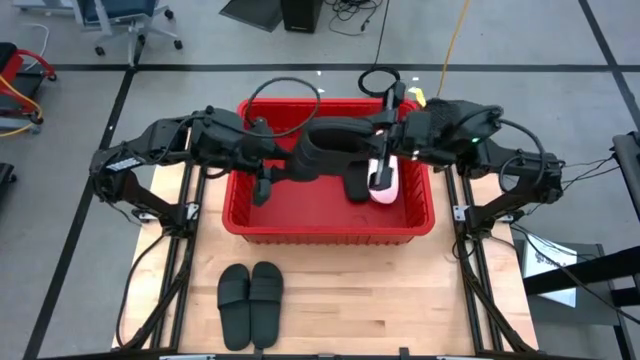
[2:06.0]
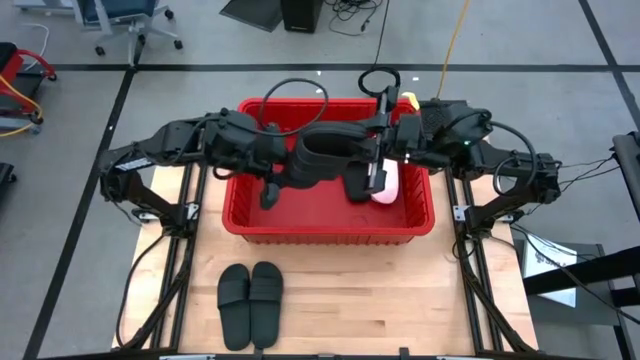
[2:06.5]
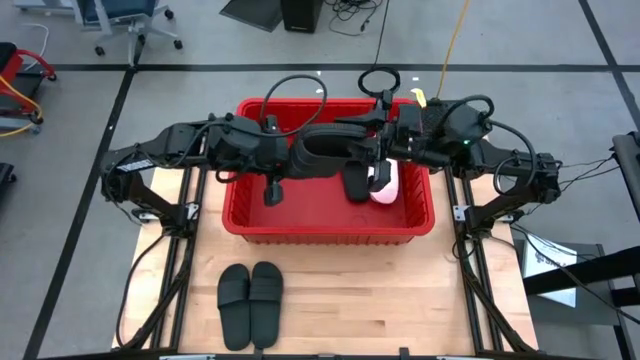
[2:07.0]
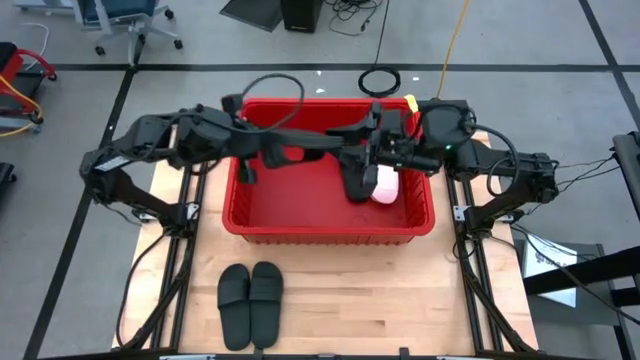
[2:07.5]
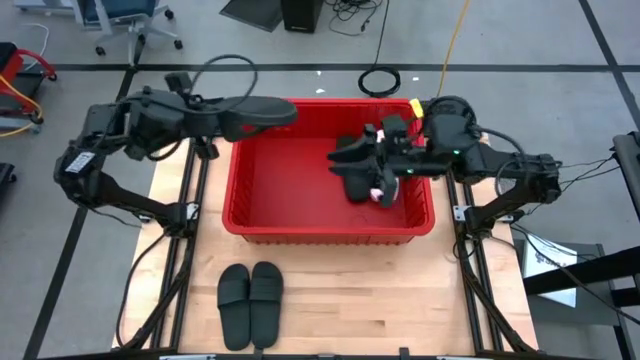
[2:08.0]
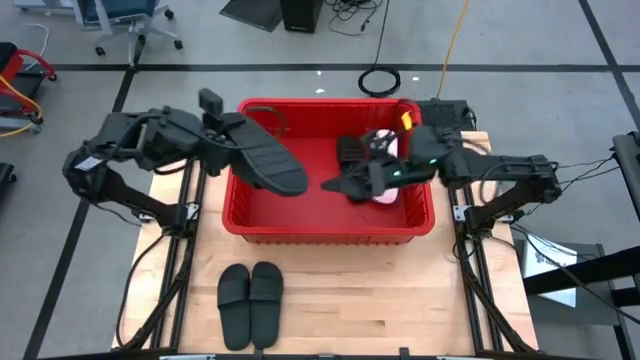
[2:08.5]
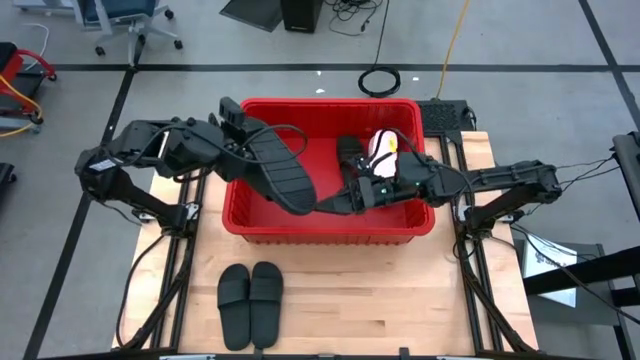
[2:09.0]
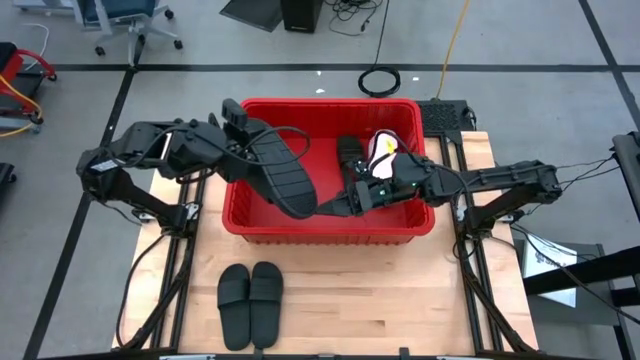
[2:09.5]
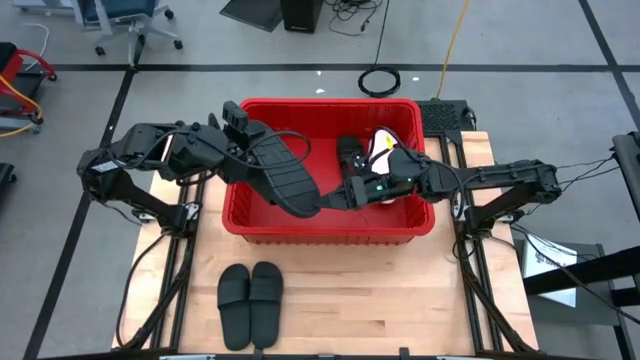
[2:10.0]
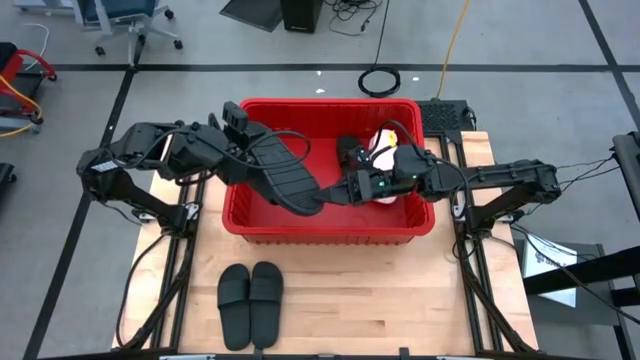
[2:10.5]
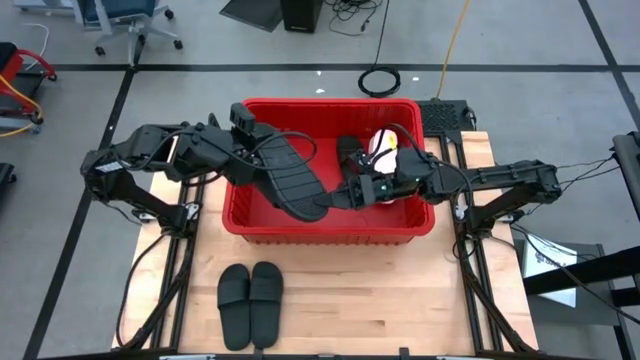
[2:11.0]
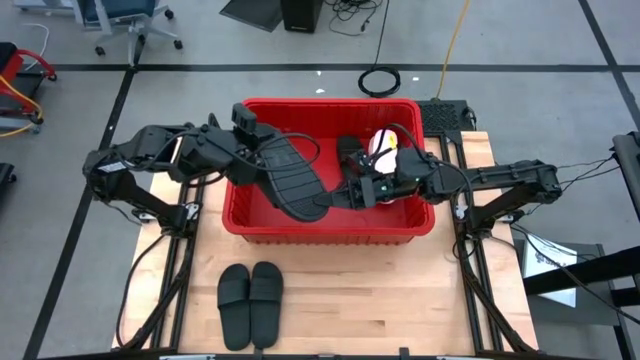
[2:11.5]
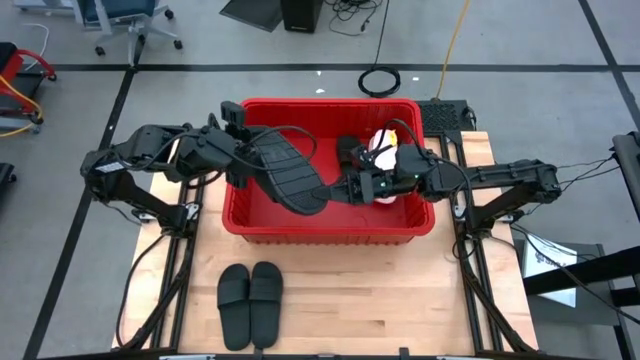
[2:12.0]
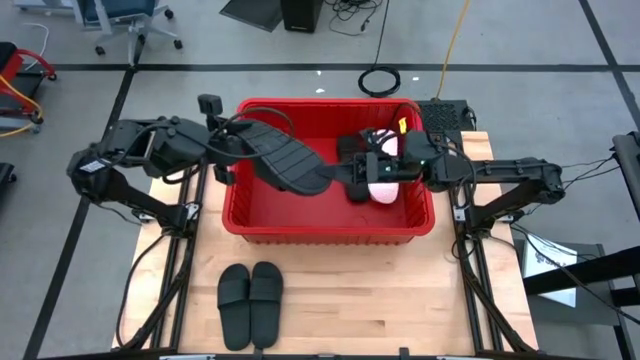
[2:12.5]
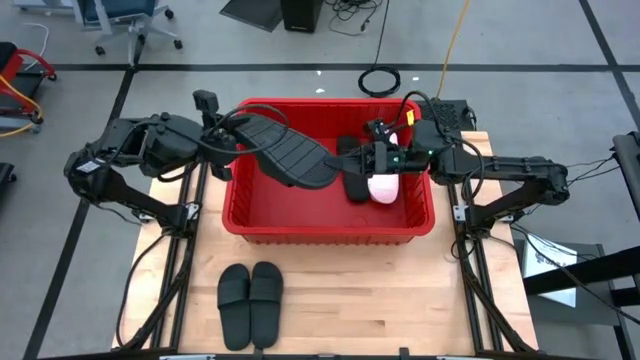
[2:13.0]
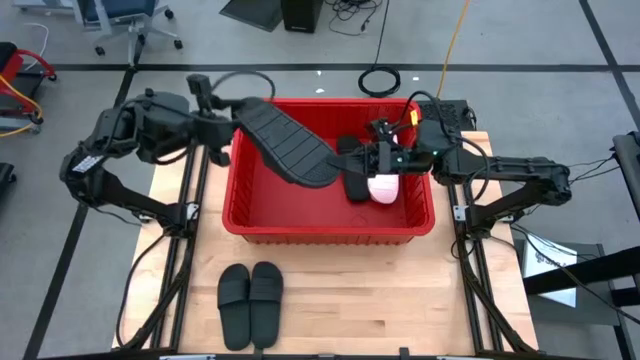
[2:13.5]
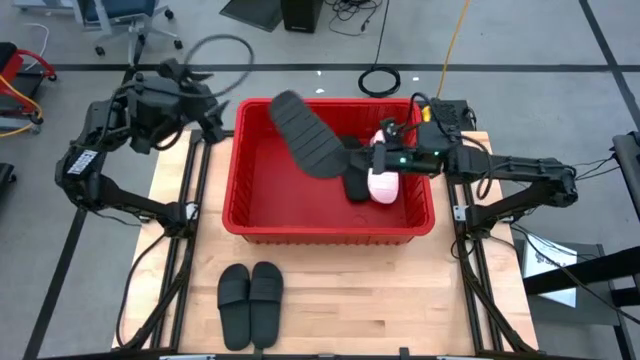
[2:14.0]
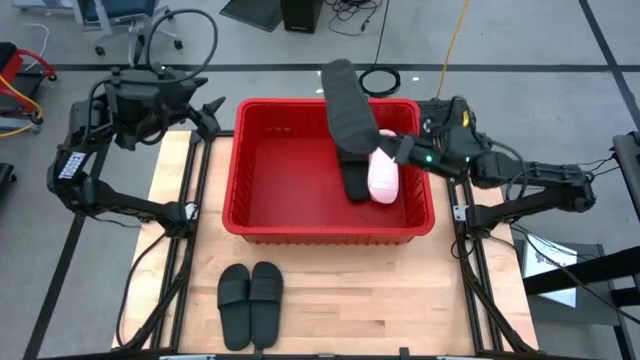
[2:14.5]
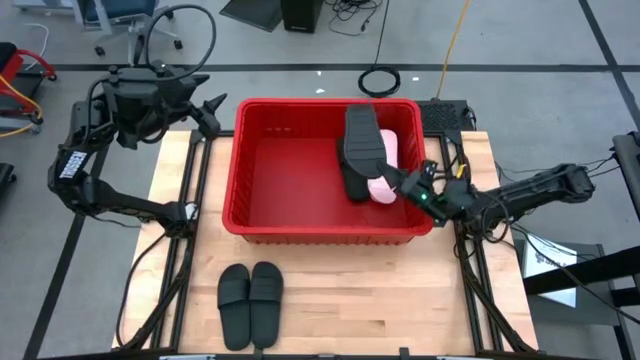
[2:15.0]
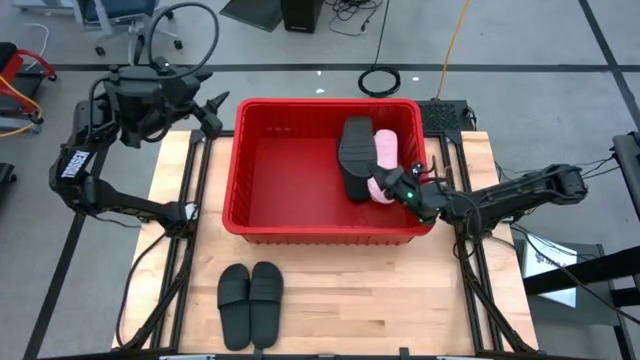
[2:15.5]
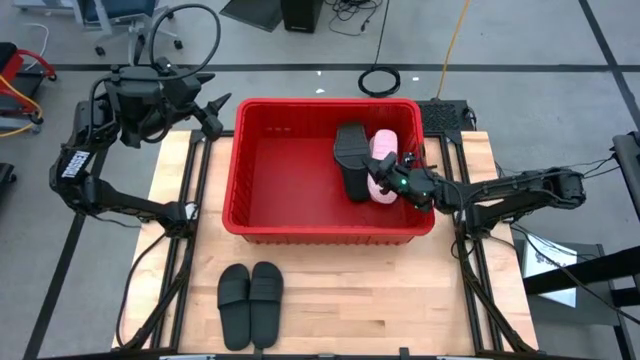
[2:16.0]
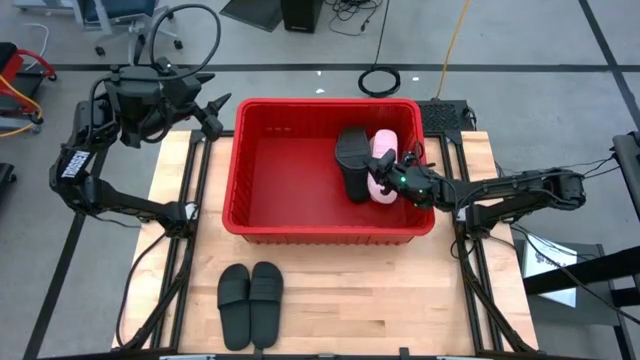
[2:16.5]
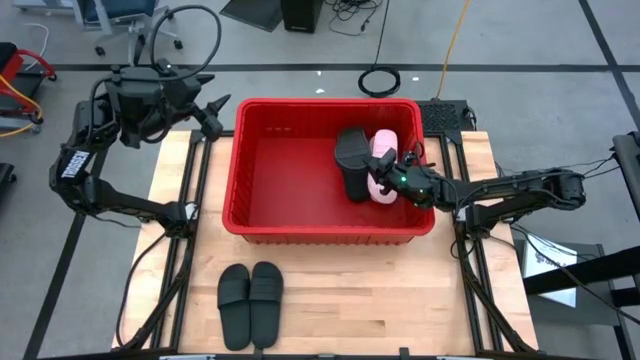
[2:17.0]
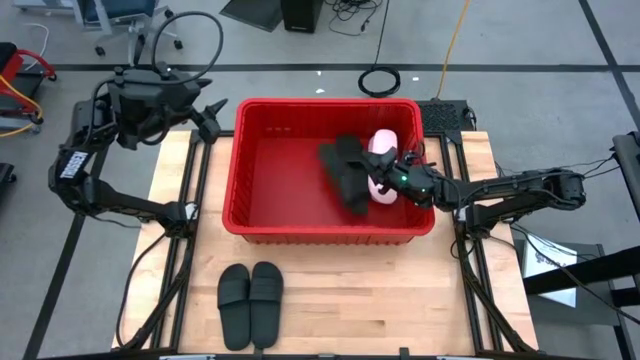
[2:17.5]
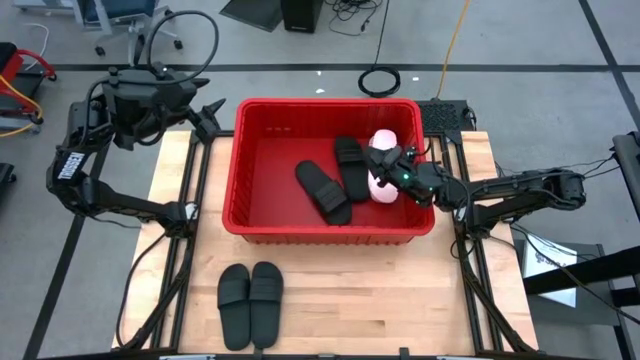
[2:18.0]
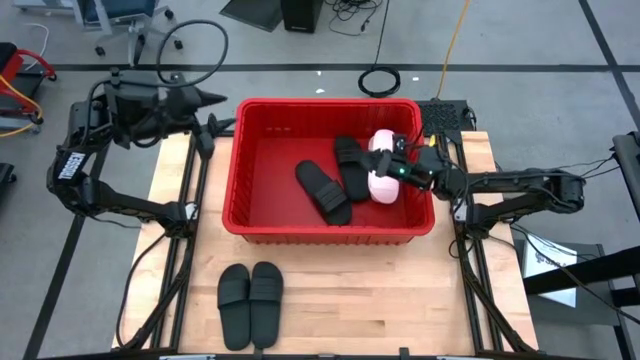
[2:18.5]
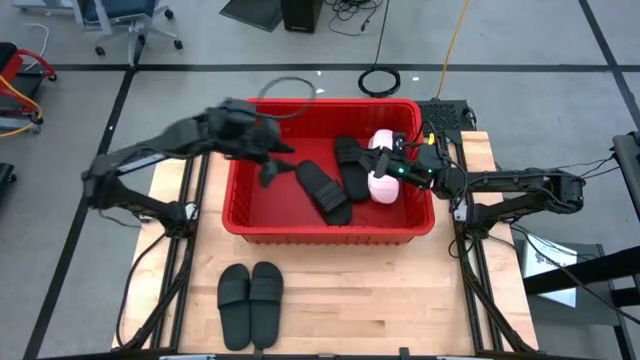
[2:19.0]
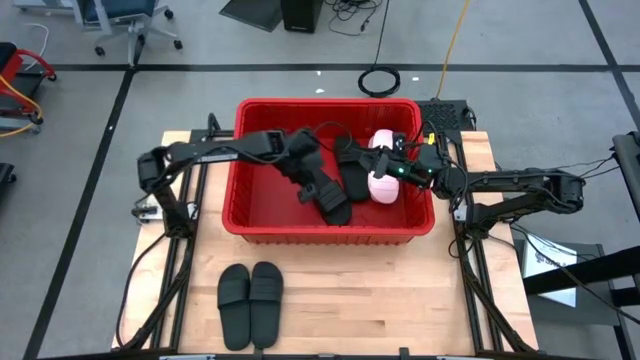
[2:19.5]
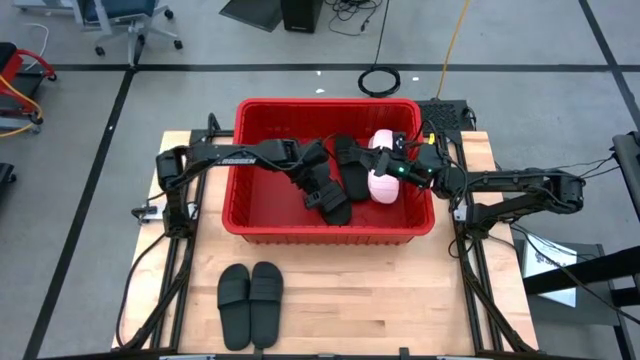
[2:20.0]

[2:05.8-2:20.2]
Task: Pick and place slides into bin
Stack the black slide on top of the black slide in the red bin

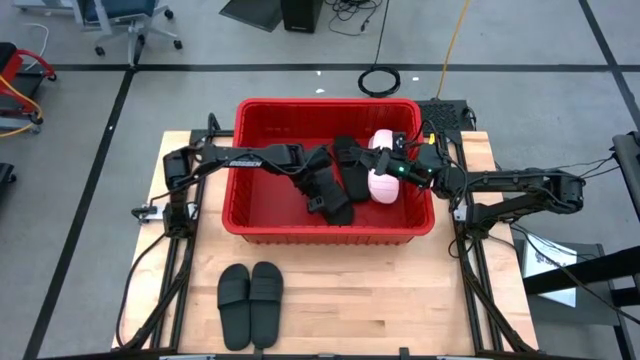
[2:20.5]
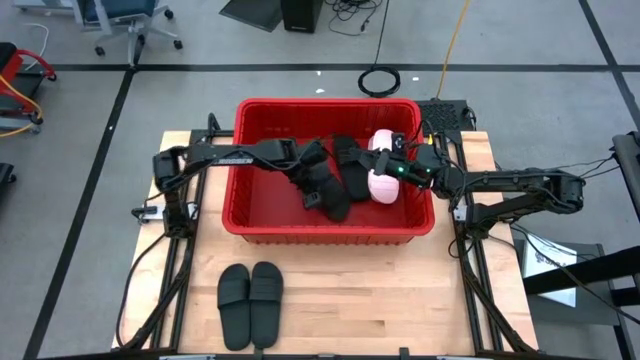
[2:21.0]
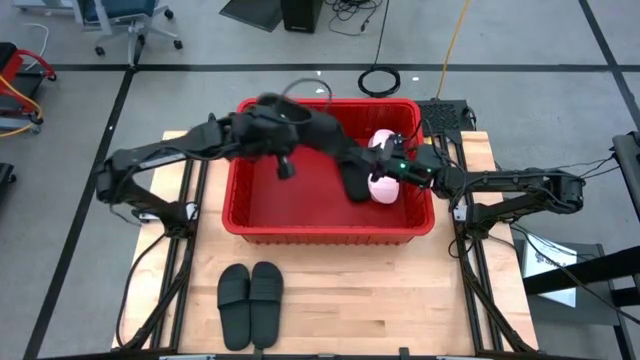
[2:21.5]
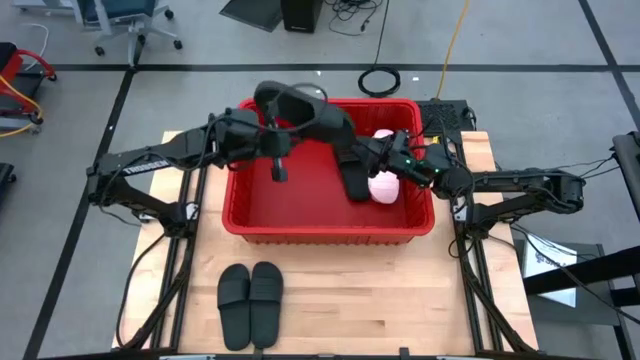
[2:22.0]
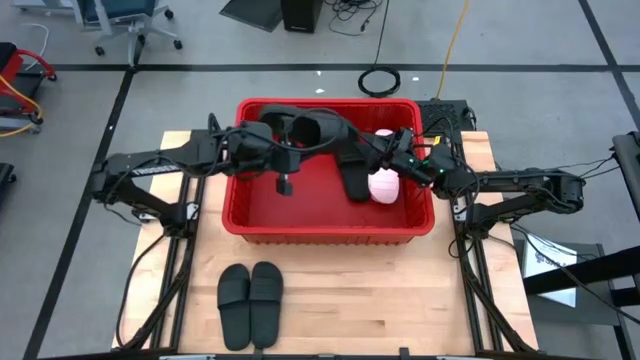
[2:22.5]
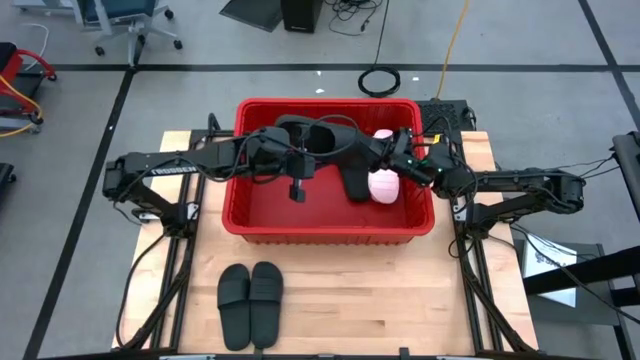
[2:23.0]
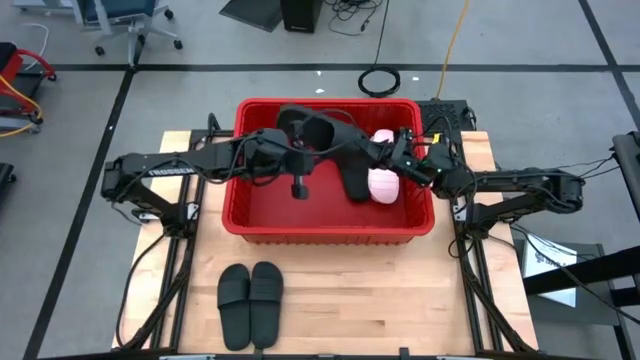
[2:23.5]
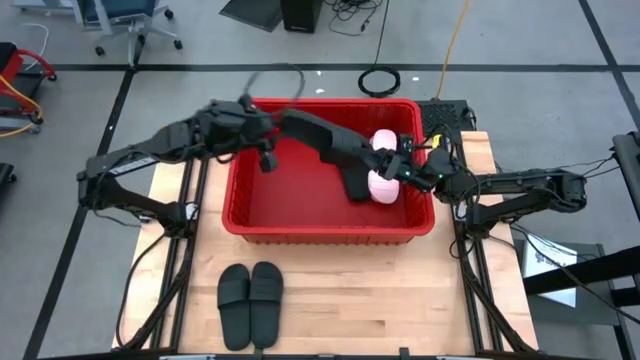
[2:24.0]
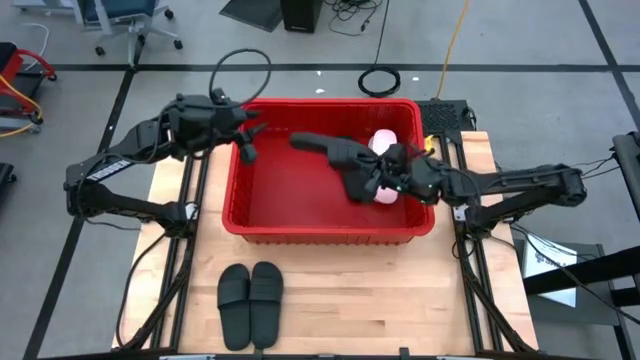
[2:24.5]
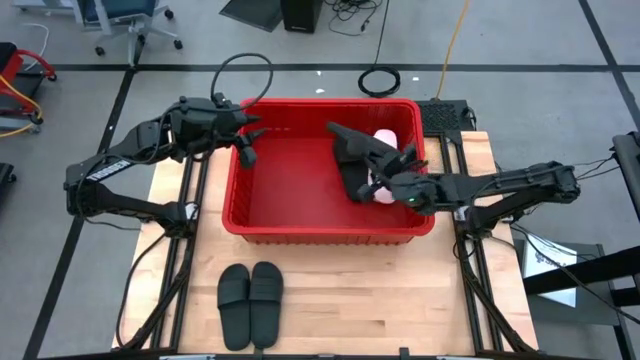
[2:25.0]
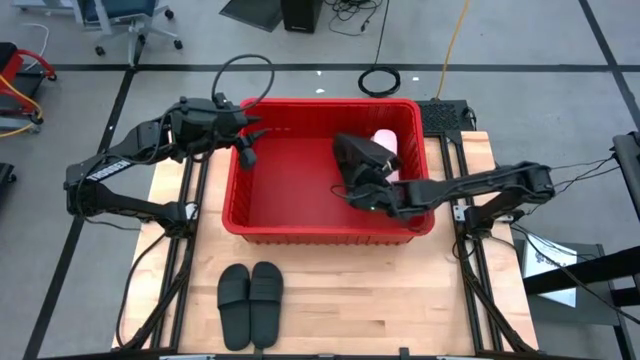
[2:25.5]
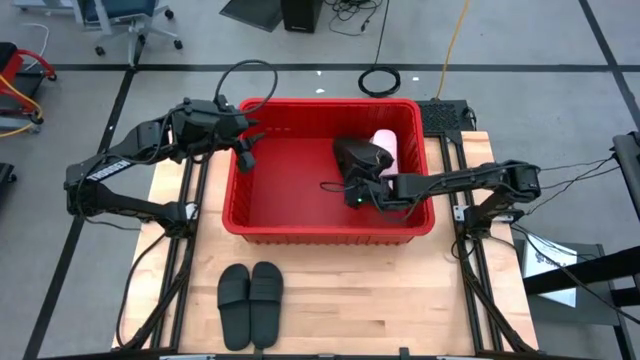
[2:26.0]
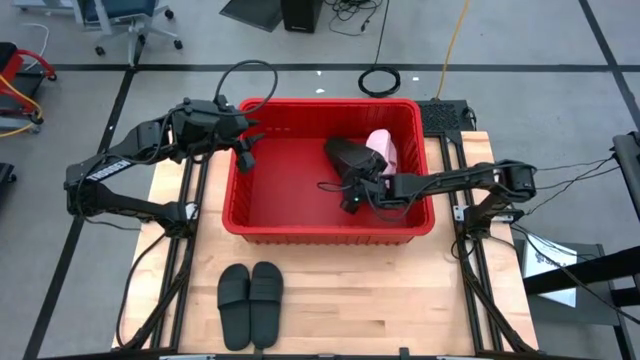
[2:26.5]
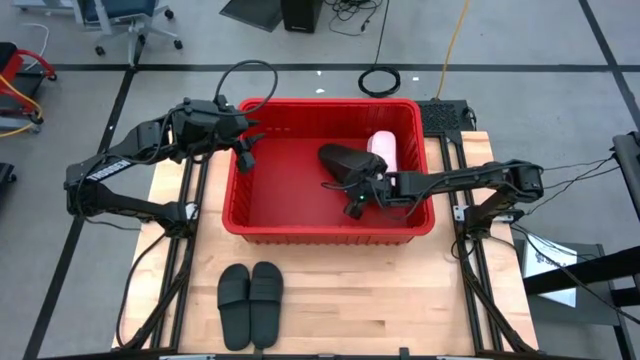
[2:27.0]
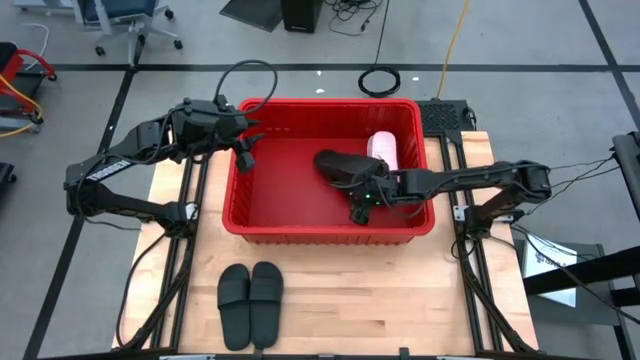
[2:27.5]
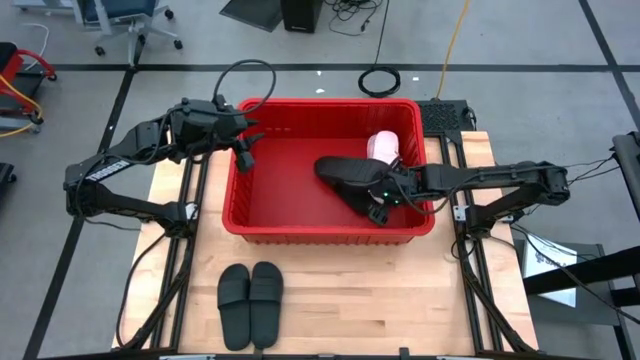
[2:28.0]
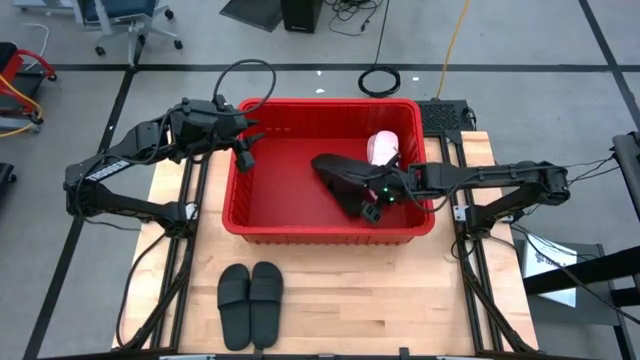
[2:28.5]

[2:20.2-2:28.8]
Stack the black slide on top of the black slide in the red bin
